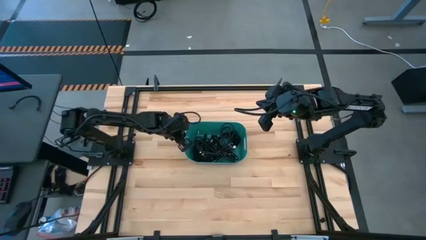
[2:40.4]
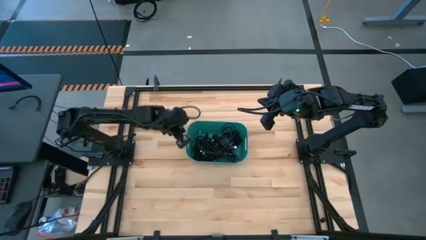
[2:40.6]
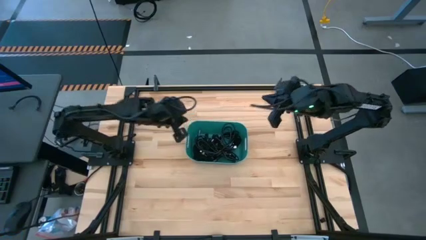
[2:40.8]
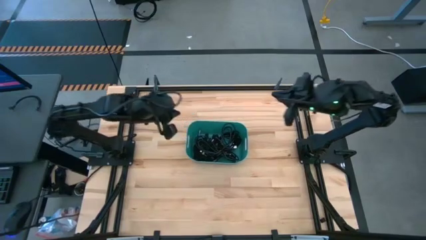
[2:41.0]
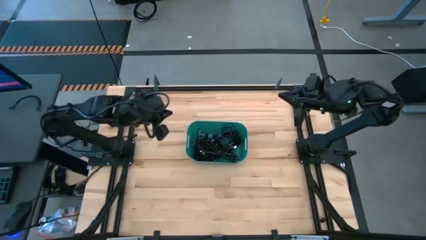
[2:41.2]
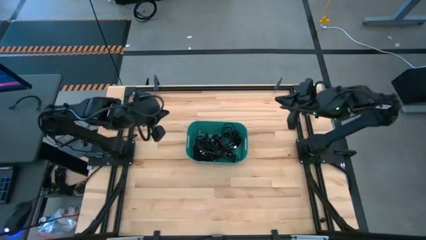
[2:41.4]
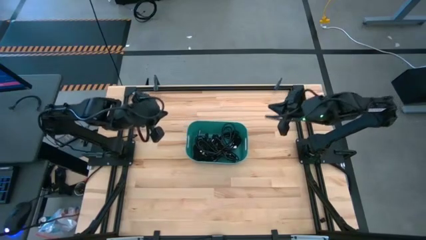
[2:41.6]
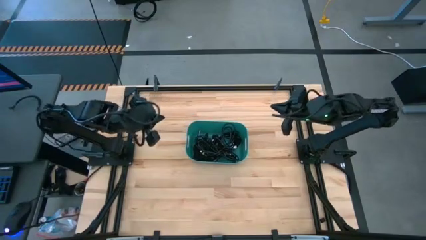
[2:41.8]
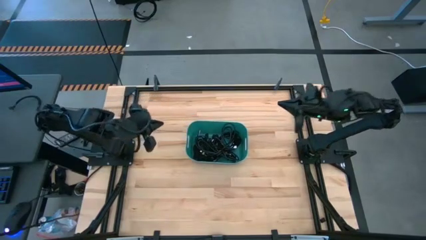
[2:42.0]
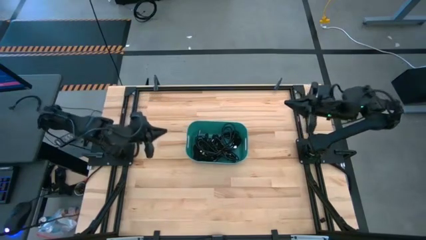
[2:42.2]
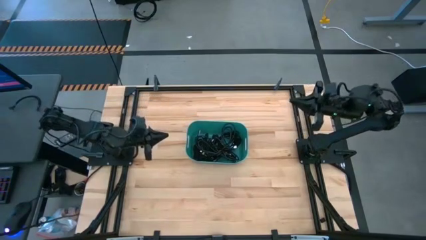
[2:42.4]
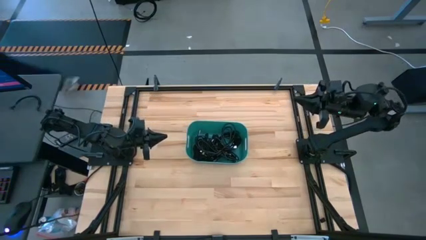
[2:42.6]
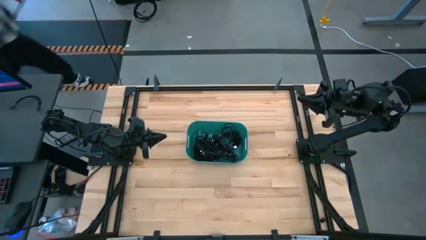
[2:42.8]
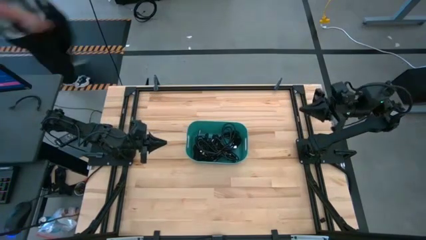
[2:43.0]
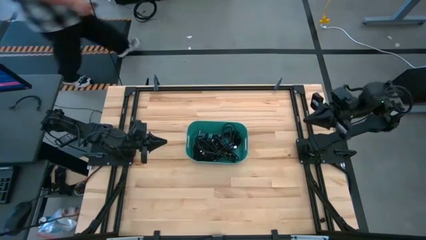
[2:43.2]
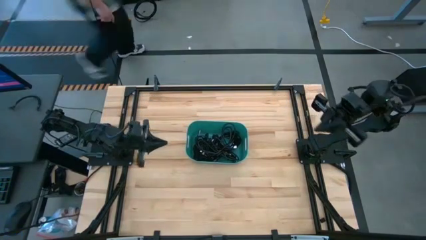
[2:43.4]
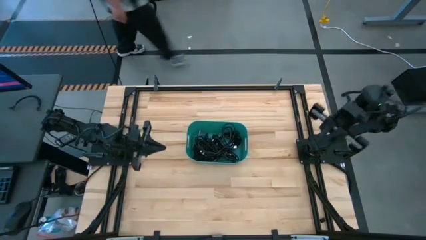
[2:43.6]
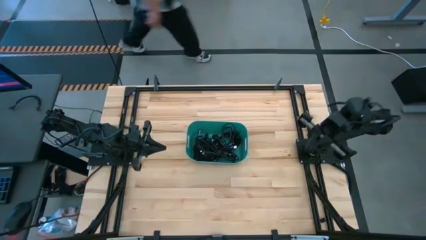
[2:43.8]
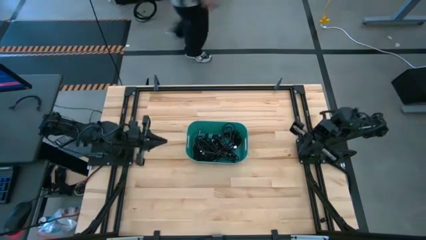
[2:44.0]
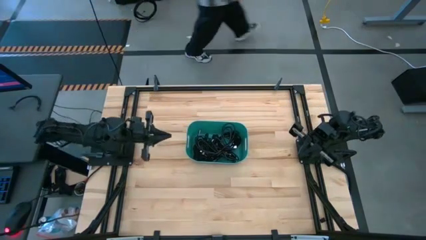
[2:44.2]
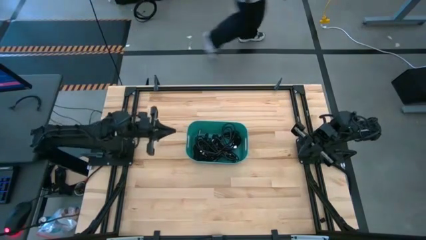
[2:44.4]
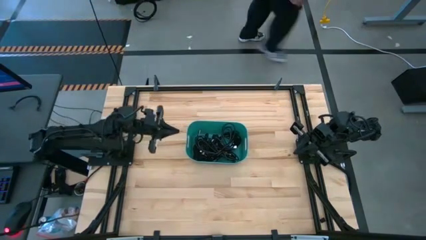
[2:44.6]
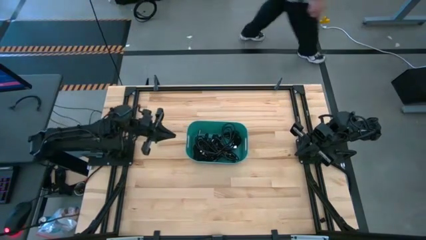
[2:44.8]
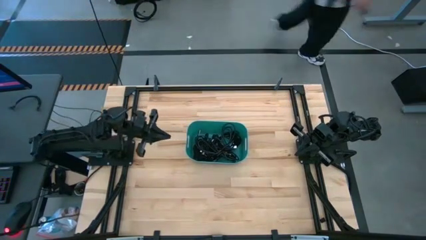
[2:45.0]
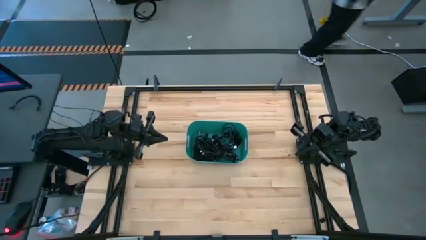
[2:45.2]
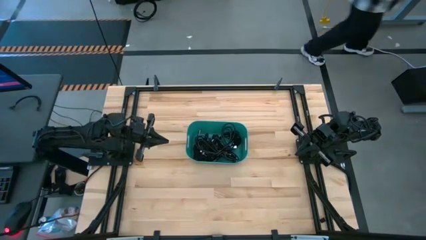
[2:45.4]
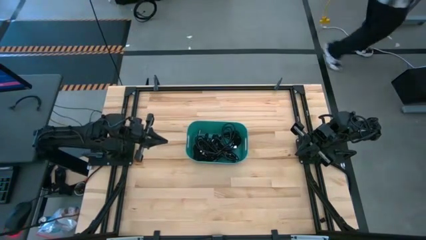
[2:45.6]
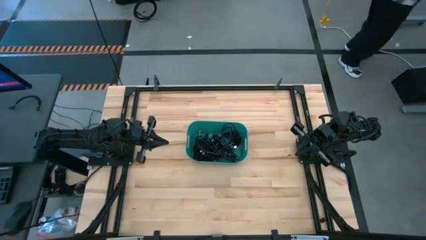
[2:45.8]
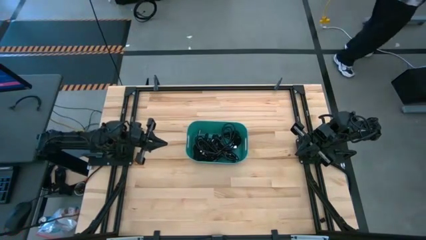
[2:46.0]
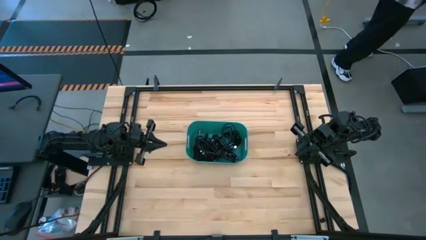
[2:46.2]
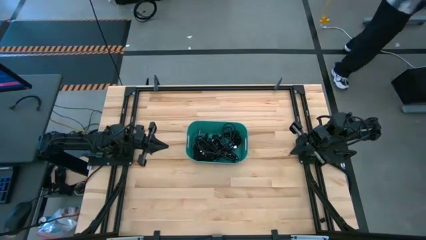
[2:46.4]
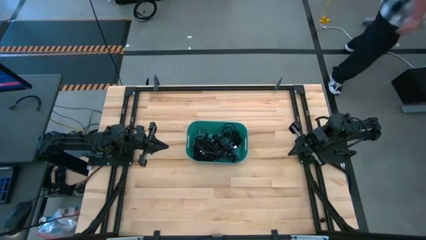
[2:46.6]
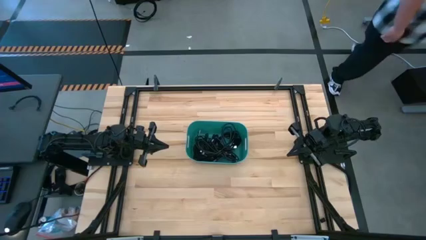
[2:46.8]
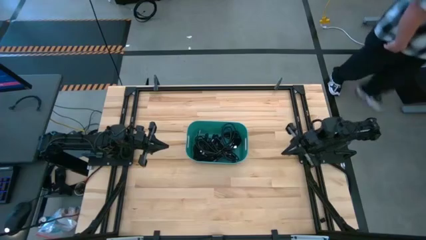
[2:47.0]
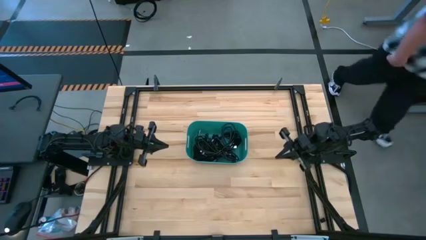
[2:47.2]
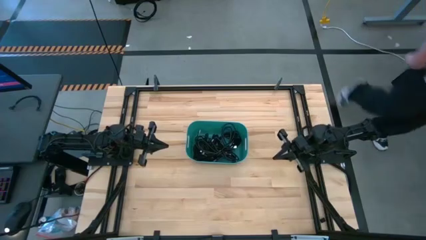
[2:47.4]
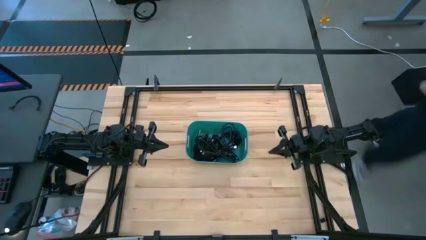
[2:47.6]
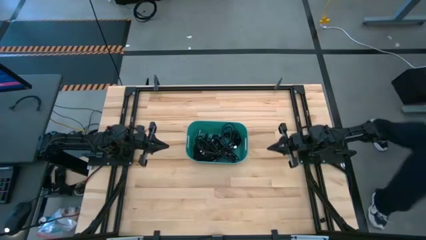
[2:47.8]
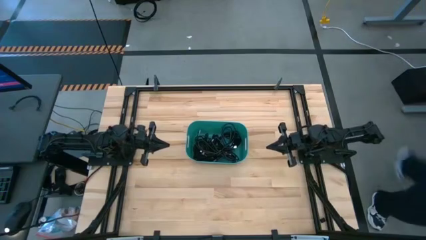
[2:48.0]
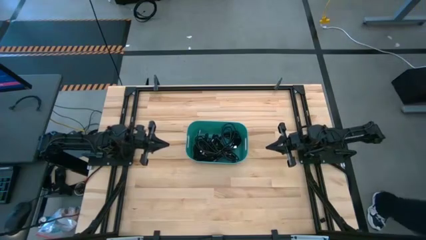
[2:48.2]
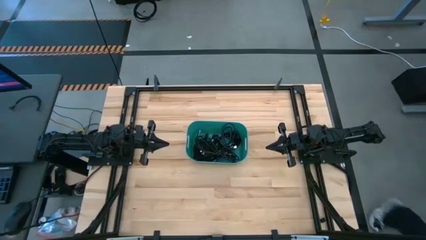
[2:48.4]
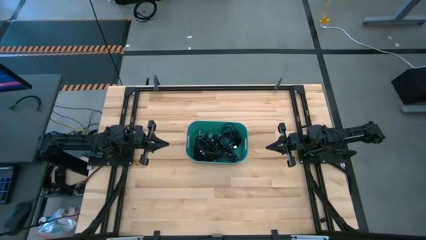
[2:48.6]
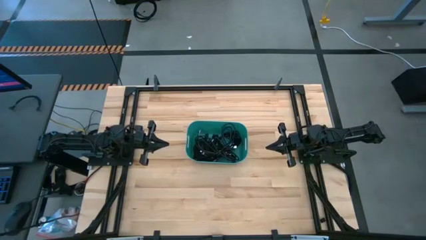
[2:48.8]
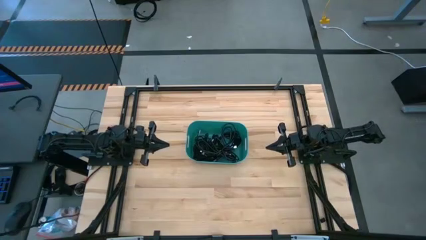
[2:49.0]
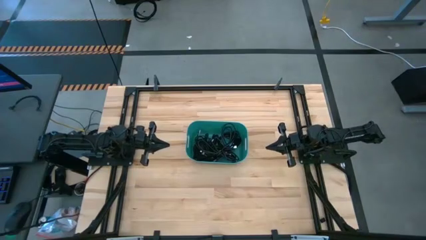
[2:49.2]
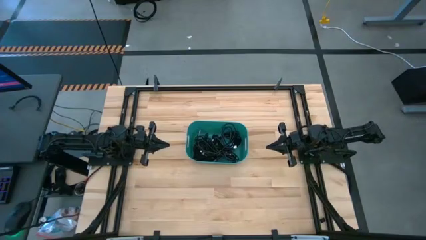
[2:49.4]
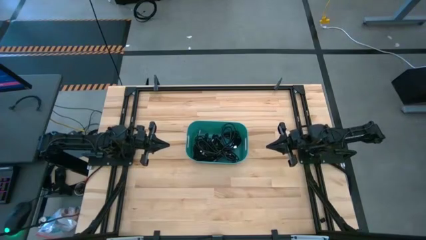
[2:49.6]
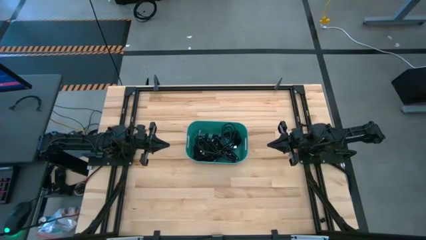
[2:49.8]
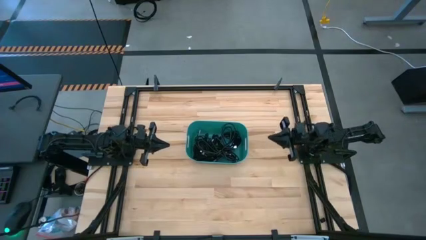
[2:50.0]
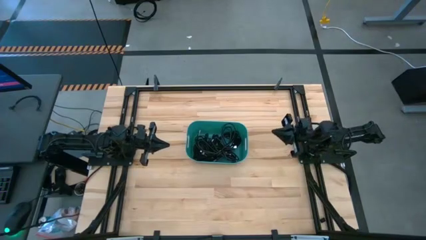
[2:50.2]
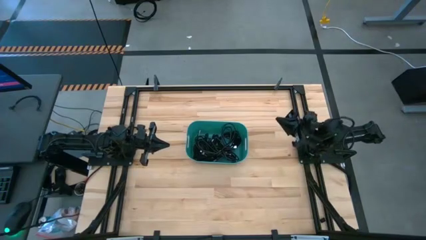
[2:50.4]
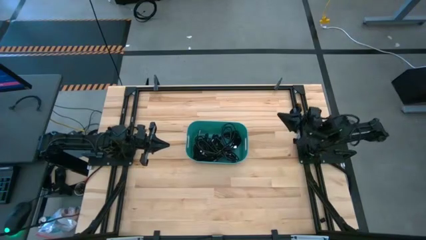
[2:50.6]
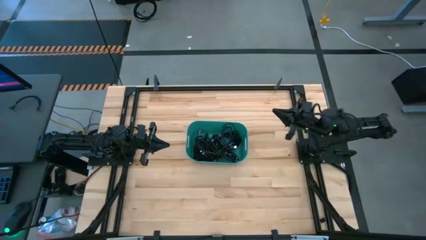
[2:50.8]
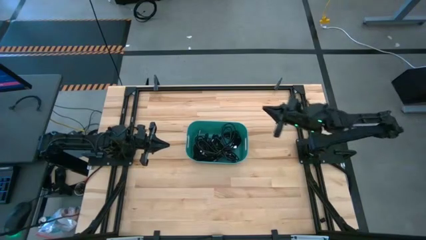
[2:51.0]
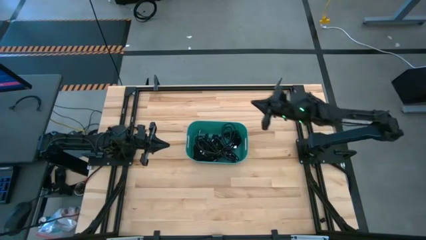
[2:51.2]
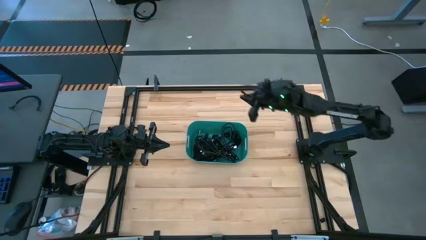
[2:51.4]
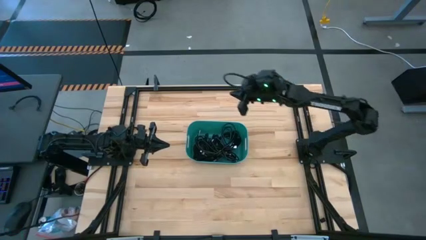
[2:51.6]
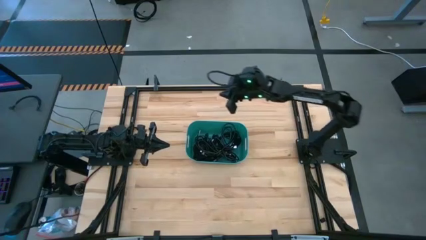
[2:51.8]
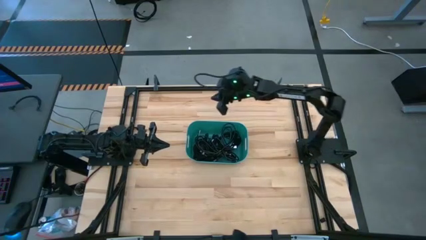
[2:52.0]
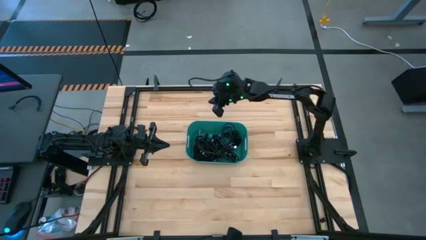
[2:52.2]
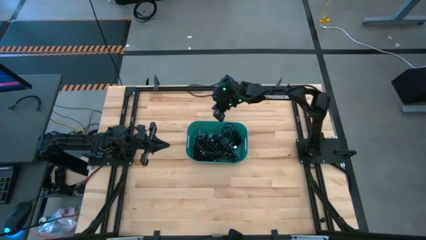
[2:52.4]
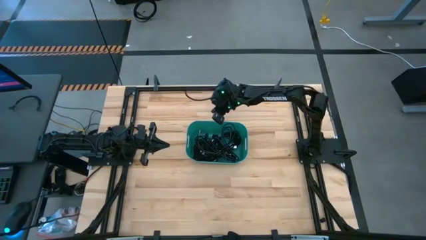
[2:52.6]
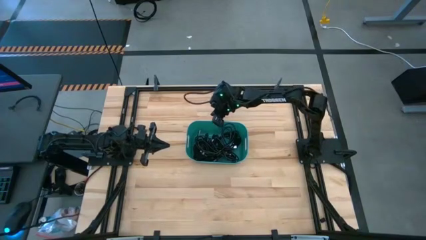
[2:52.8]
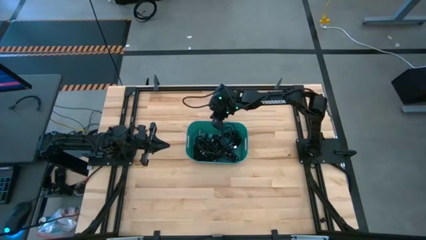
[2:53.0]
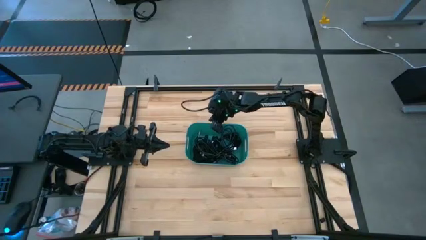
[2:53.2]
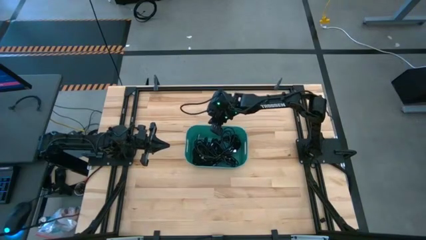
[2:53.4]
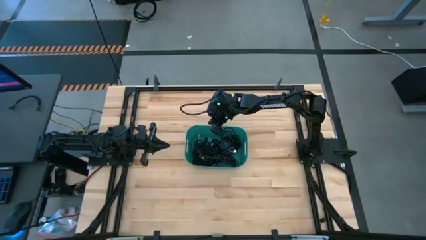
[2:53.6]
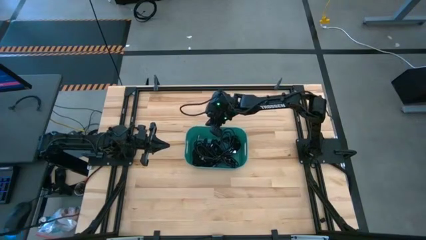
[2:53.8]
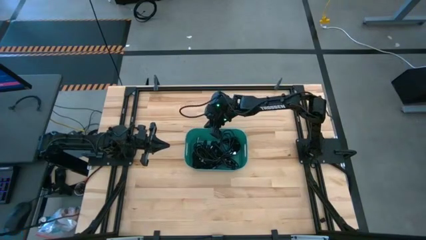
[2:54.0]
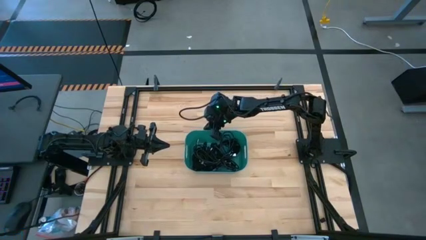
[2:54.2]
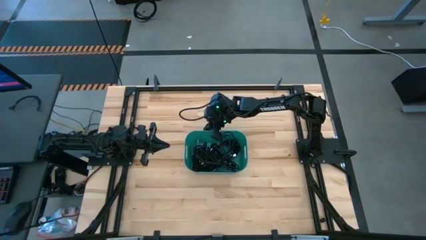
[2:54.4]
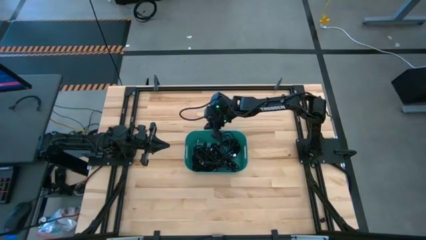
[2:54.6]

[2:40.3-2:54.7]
Task: Pick and place USB-C Cables
Adjust the green bin
